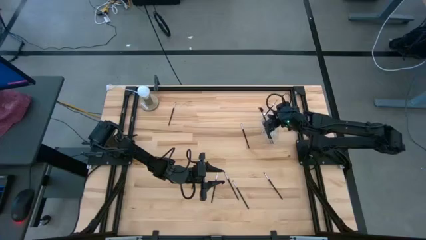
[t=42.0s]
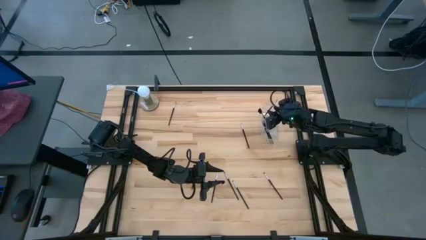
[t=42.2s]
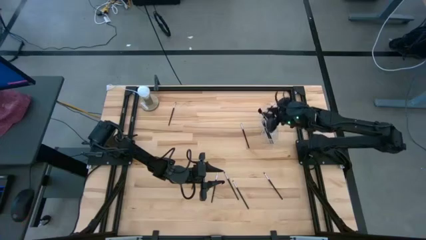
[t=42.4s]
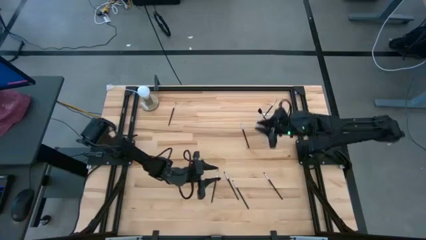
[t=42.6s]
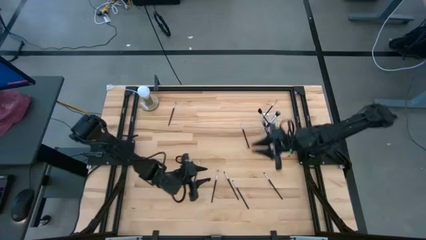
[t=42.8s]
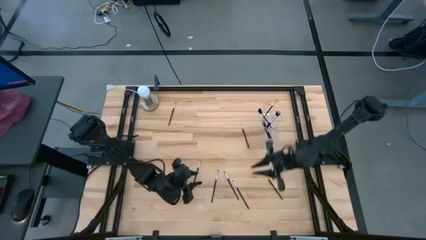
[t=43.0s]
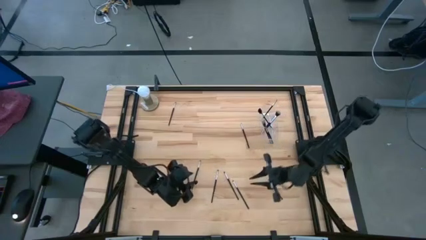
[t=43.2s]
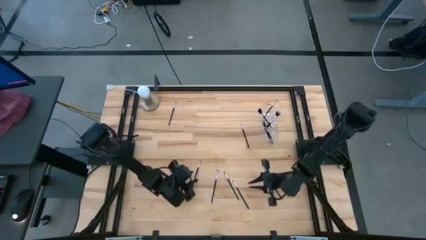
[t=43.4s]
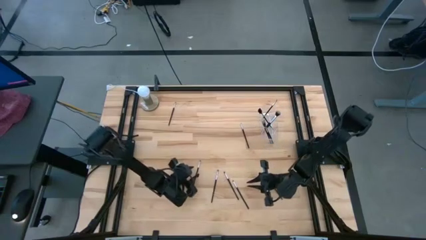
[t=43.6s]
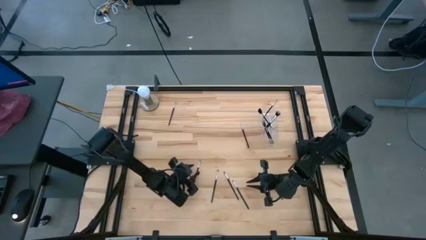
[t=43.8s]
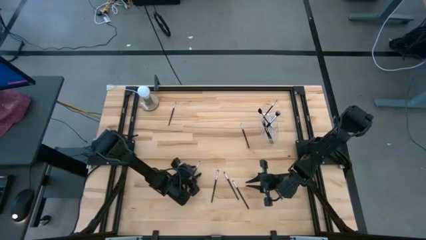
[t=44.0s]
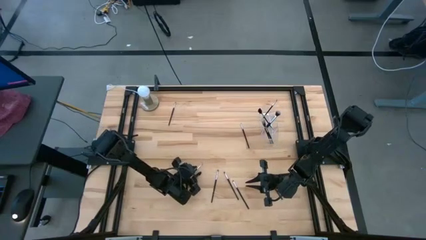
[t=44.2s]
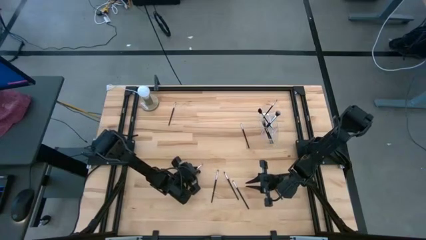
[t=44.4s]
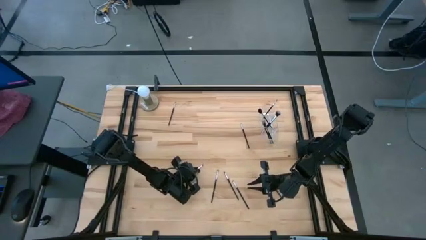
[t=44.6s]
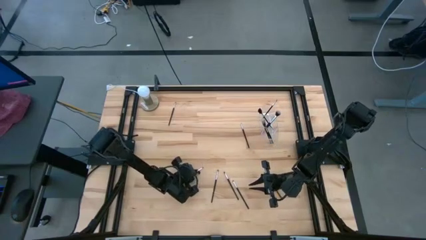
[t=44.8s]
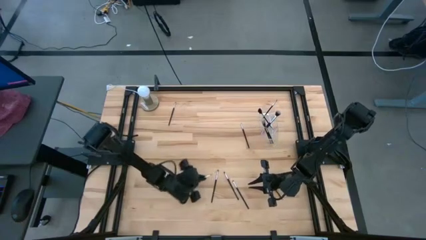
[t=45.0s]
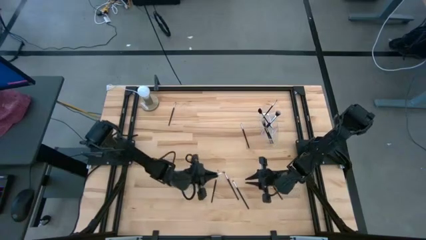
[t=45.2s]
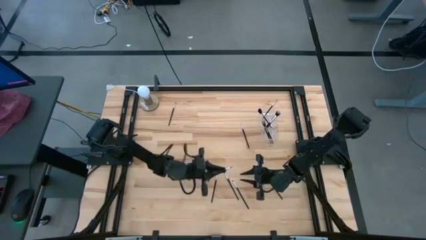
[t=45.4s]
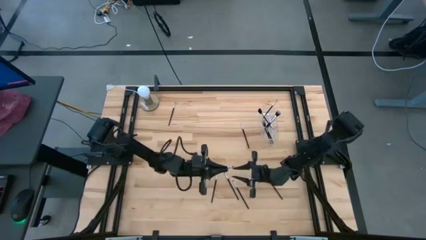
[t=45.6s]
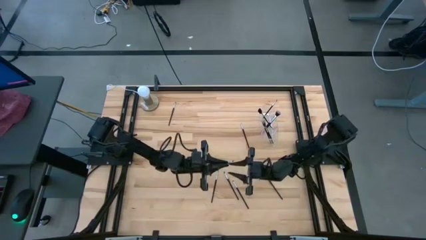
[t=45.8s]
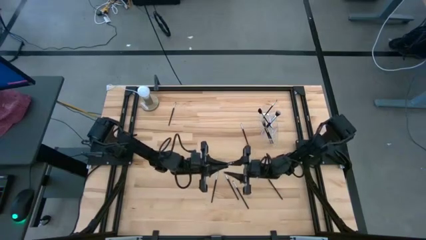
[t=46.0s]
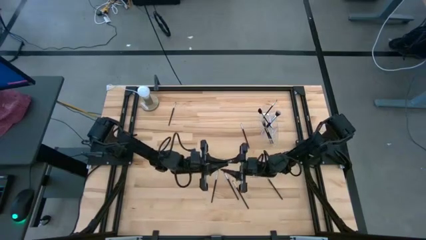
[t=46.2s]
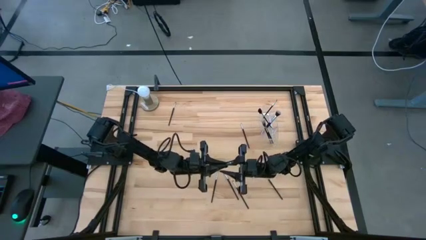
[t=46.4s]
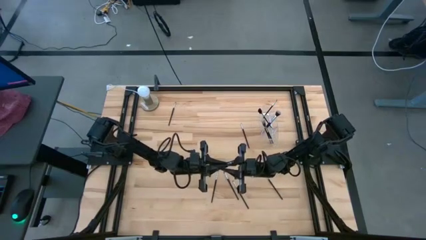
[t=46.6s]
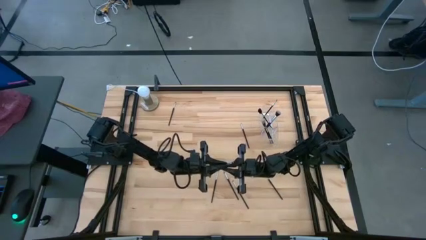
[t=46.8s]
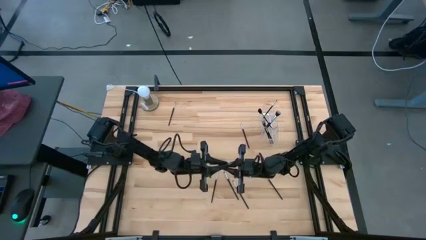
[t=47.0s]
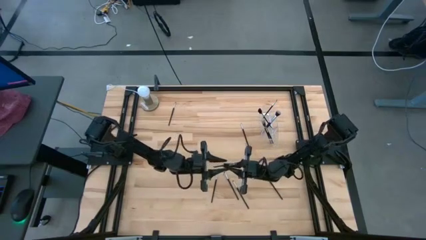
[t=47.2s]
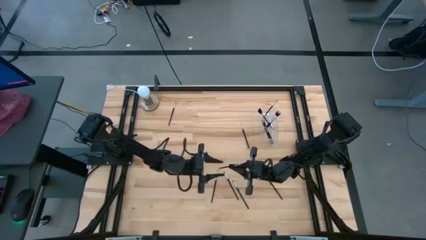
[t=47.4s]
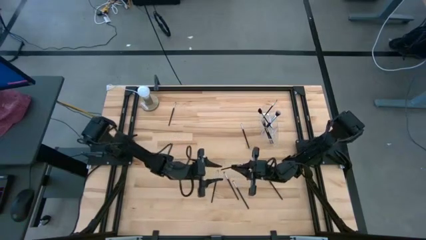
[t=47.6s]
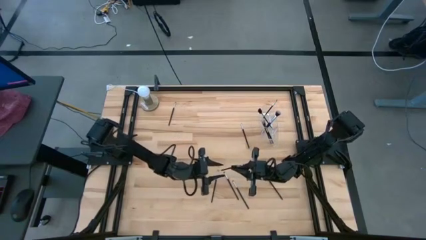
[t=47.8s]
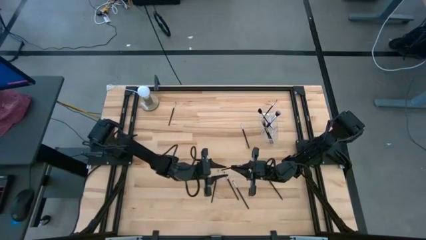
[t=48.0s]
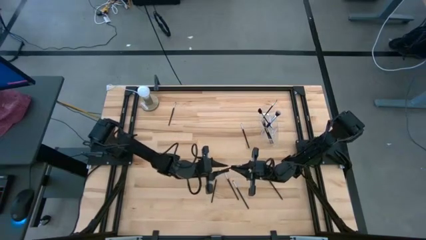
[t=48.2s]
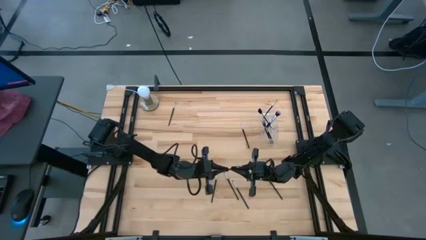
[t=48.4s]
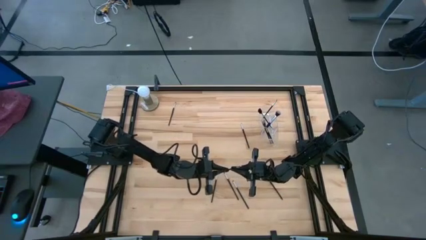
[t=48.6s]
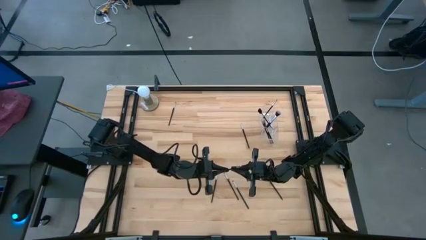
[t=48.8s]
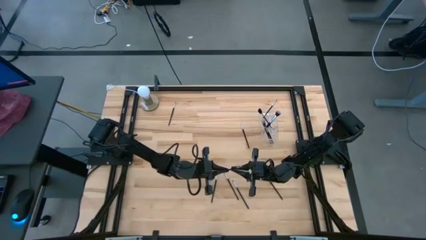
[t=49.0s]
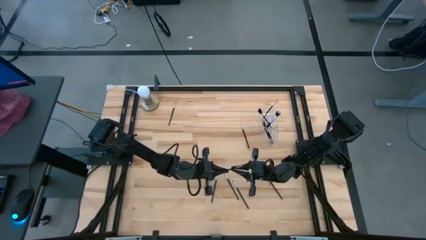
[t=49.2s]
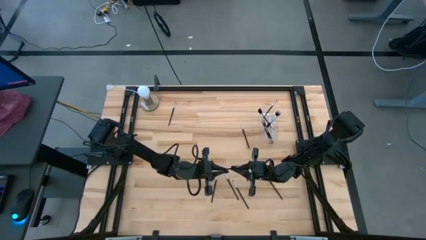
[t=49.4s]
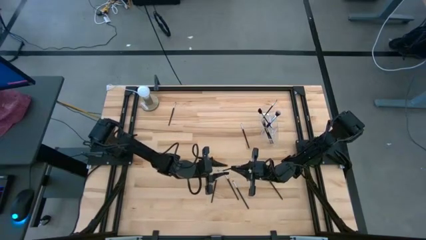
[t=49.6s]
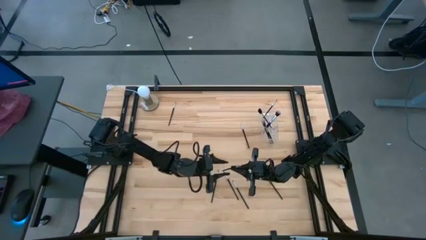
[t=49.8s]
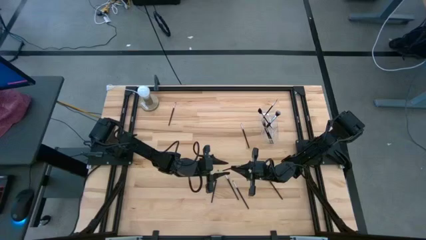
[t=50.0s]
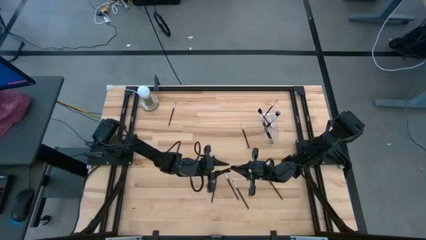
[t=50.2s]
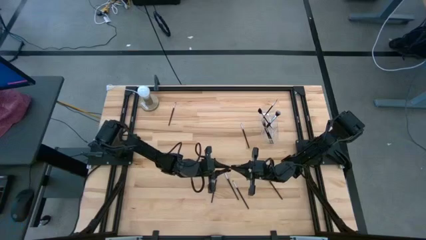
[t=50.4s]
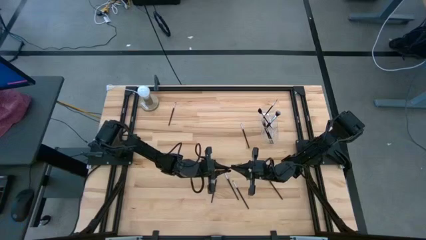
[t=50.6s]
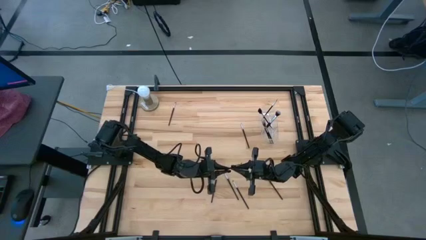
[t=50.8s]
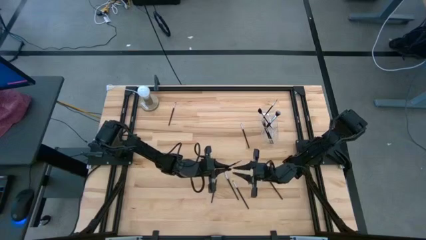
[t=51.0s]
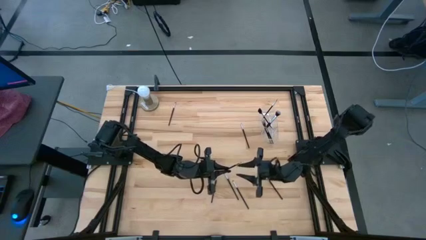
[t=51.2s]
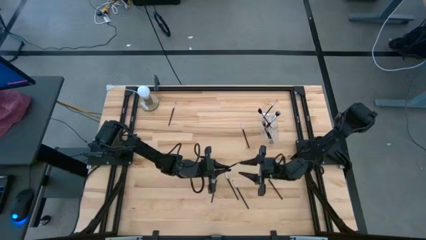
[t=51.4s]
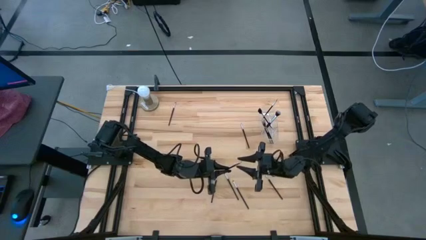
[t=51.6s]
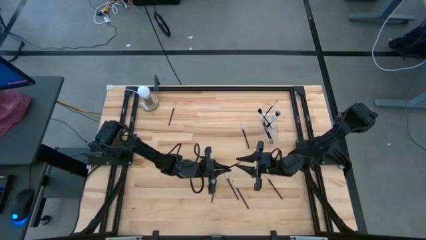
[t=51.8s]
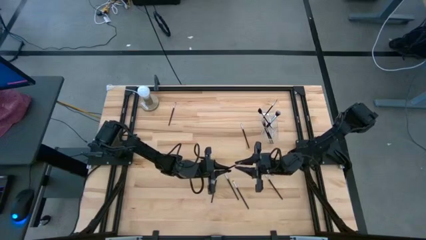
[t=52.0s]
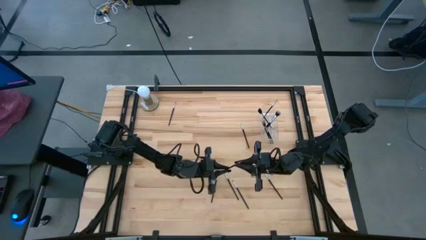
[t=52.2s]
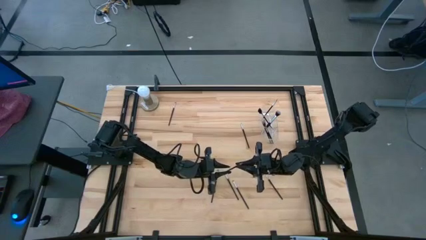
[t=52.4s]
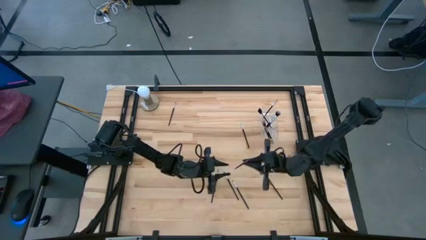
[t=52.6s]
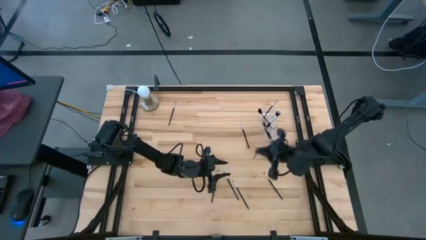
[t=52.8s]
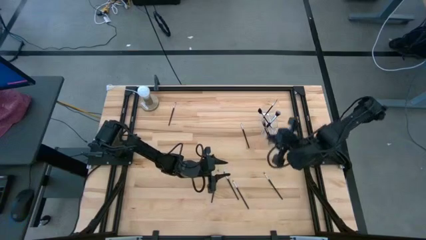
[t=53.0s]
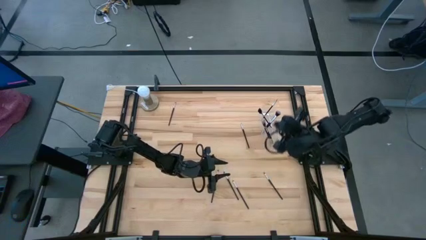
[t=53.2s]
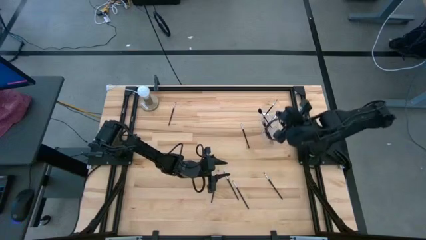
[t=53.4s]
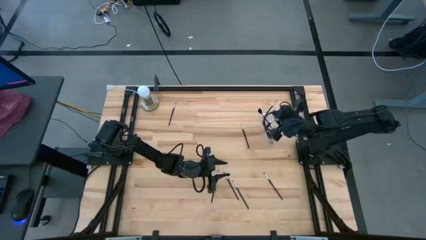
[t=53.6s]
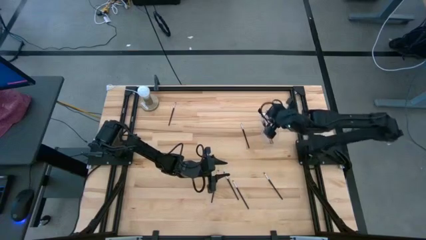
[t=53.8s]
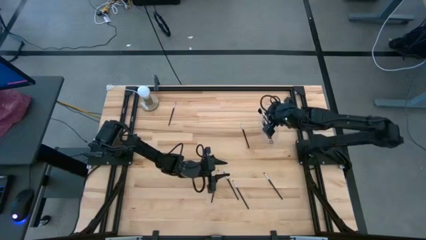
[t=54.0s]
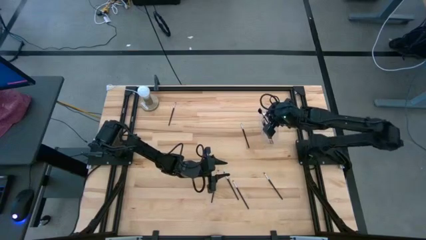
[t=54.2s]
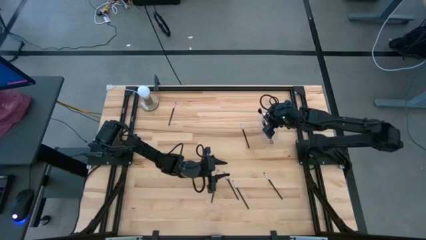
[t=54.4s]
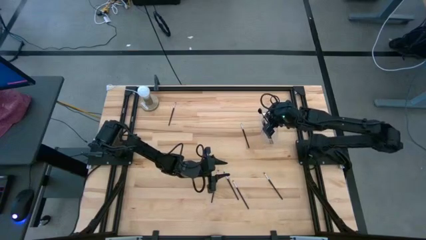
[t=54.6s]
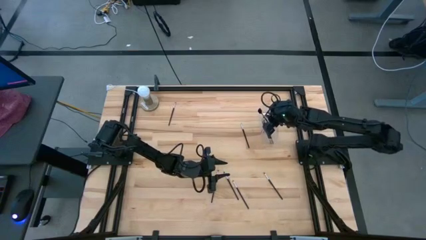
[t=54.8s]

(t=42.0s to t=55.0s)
Task: Sort items
Put the silver eyeshadow brush into the transparent organizer
